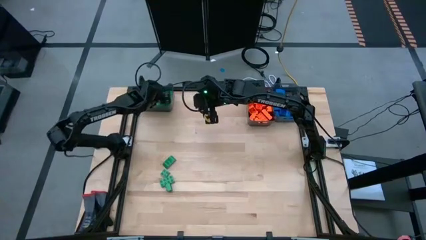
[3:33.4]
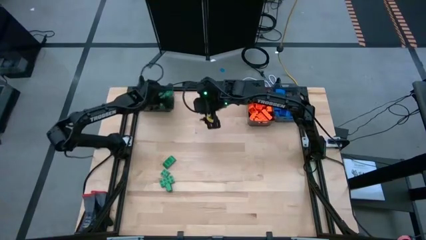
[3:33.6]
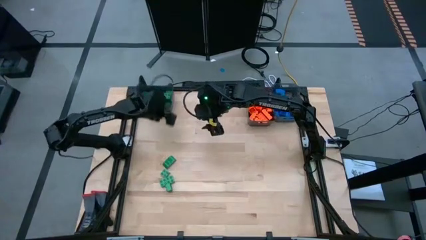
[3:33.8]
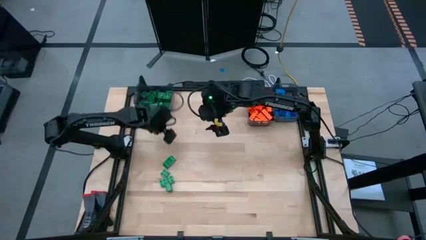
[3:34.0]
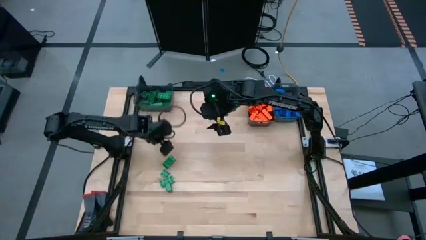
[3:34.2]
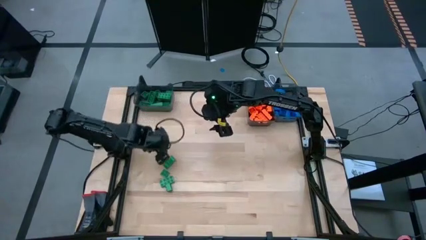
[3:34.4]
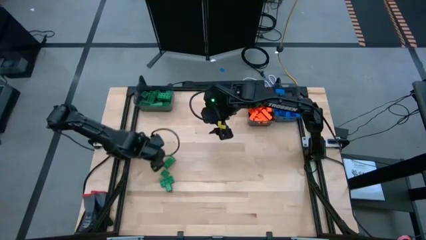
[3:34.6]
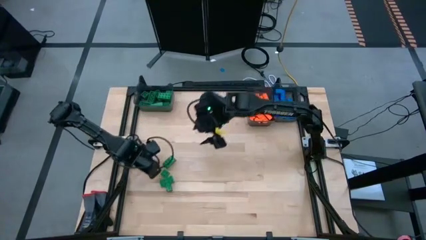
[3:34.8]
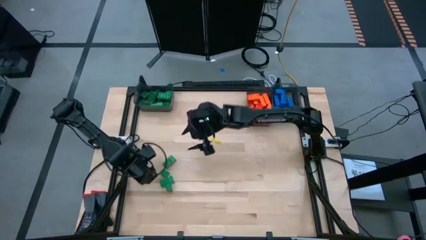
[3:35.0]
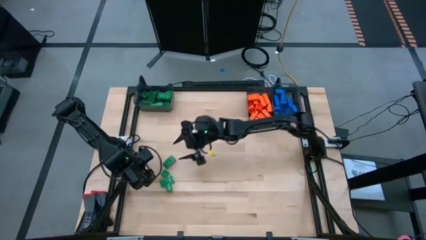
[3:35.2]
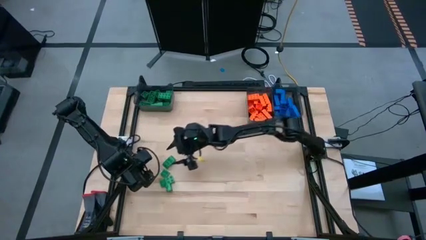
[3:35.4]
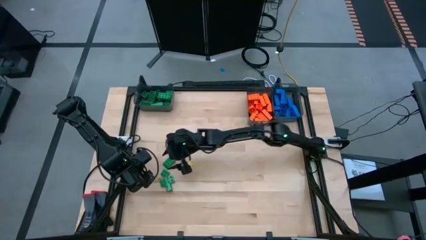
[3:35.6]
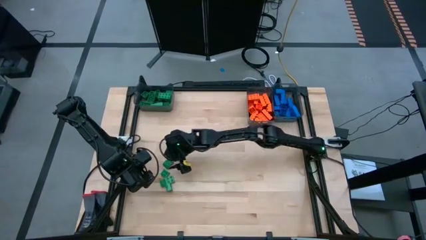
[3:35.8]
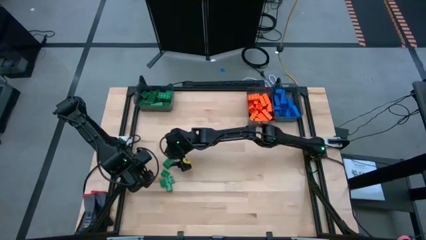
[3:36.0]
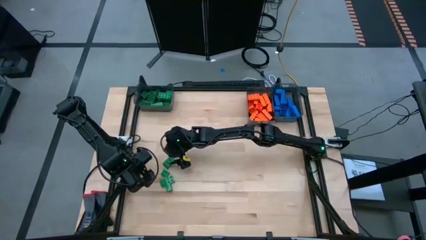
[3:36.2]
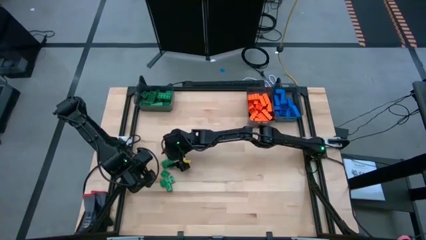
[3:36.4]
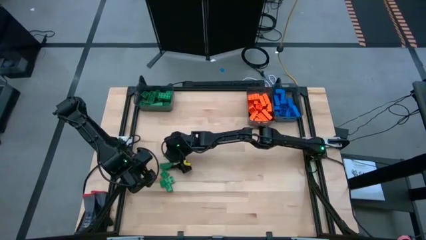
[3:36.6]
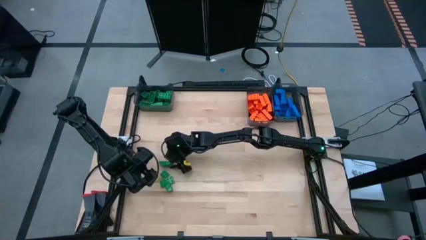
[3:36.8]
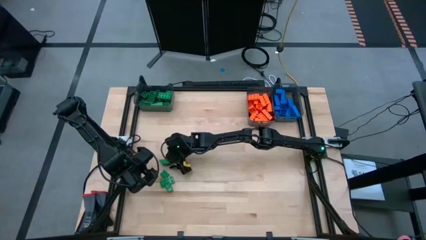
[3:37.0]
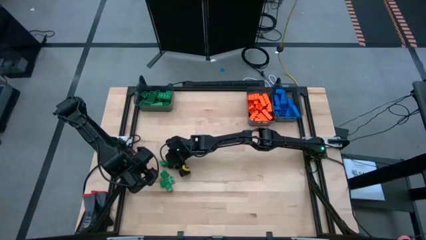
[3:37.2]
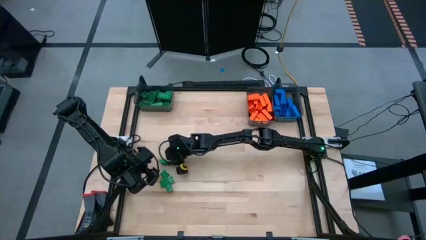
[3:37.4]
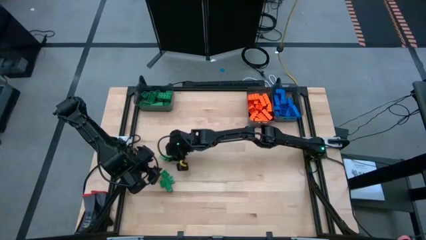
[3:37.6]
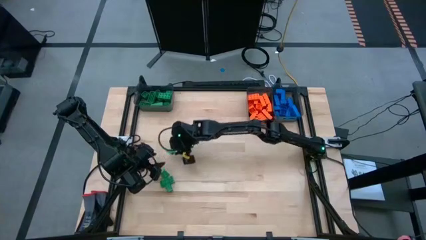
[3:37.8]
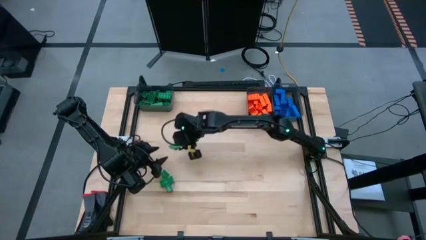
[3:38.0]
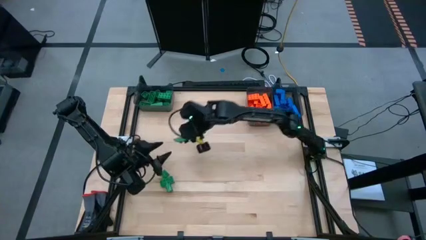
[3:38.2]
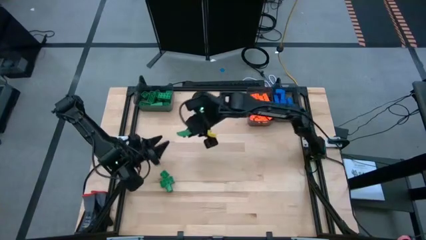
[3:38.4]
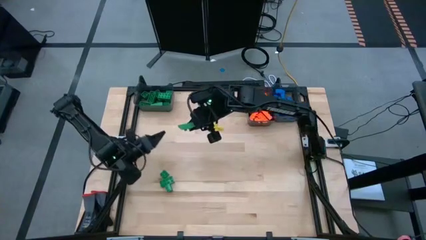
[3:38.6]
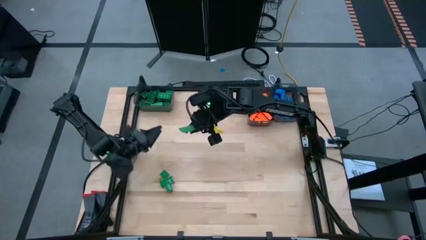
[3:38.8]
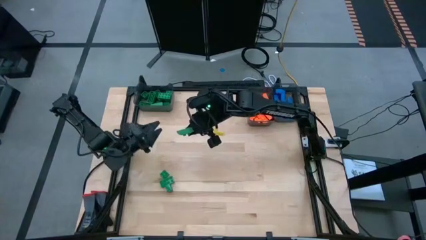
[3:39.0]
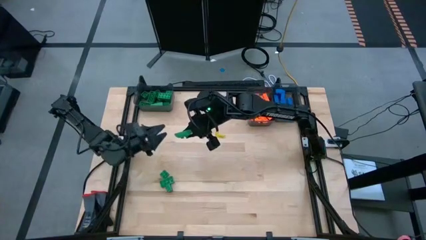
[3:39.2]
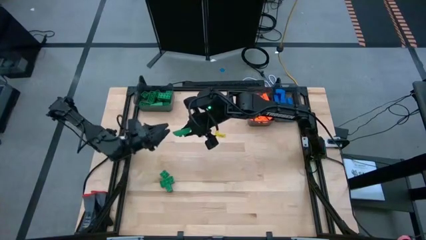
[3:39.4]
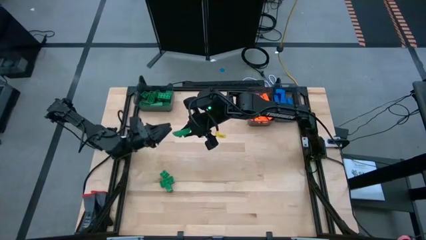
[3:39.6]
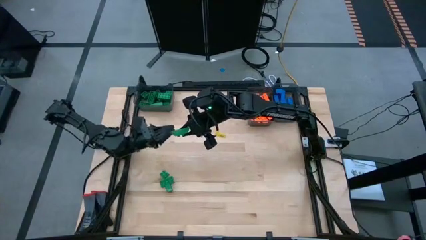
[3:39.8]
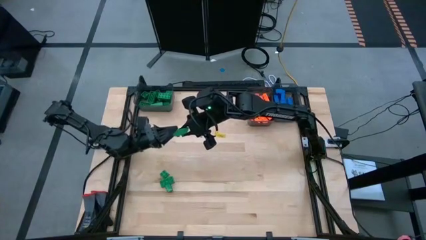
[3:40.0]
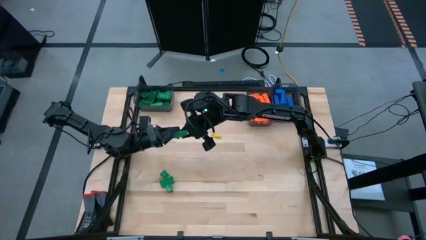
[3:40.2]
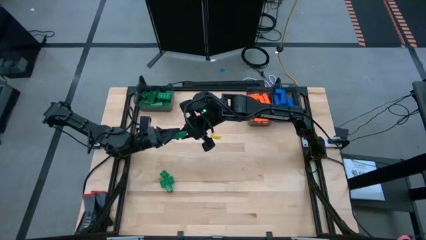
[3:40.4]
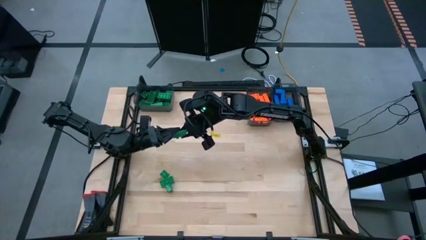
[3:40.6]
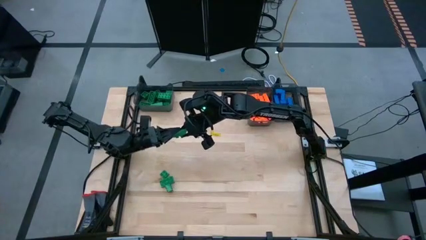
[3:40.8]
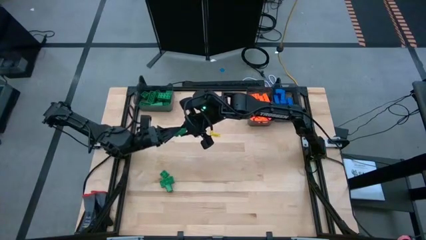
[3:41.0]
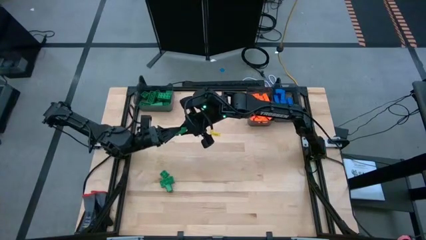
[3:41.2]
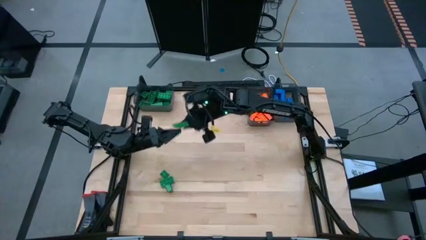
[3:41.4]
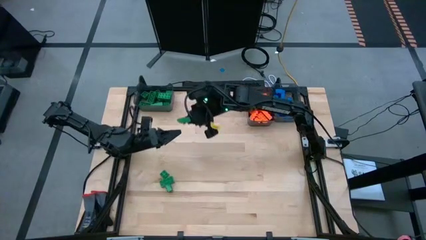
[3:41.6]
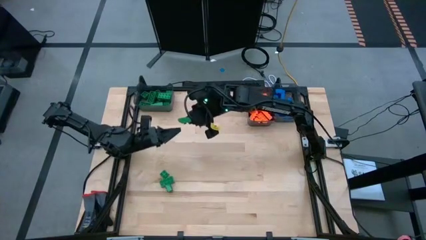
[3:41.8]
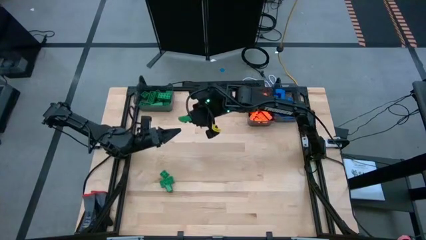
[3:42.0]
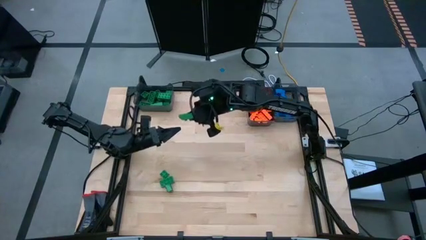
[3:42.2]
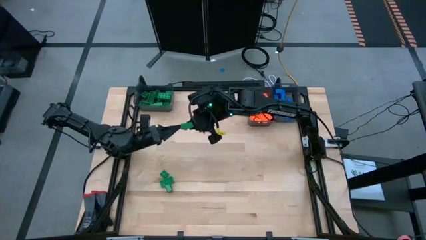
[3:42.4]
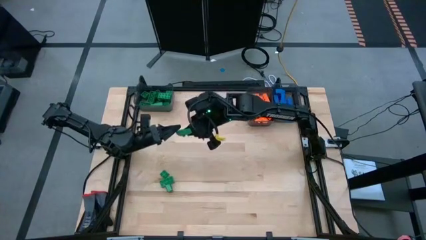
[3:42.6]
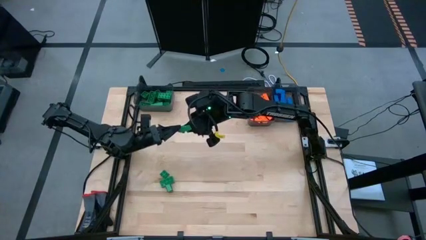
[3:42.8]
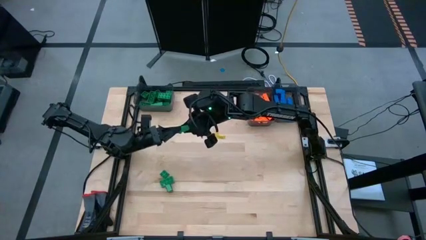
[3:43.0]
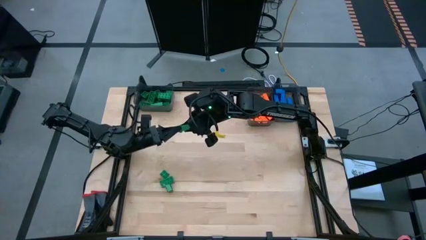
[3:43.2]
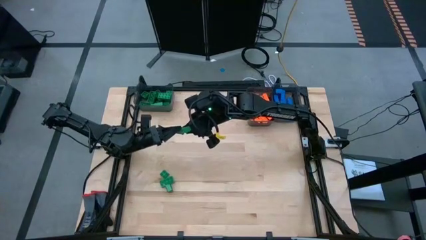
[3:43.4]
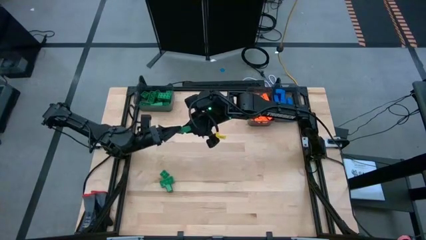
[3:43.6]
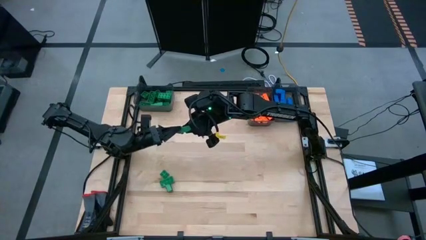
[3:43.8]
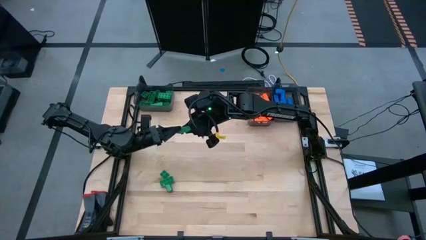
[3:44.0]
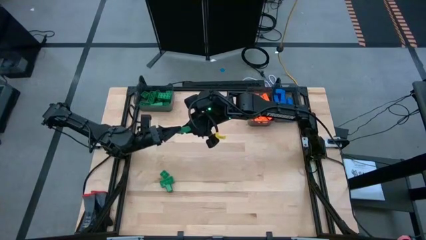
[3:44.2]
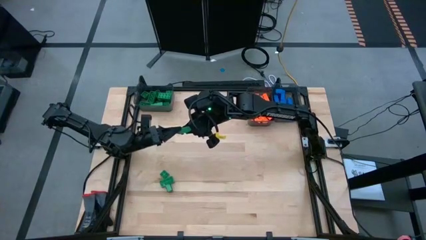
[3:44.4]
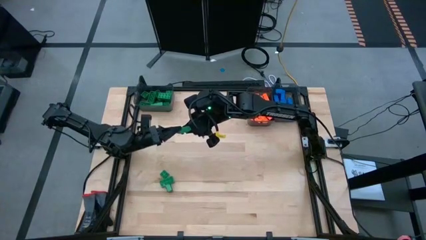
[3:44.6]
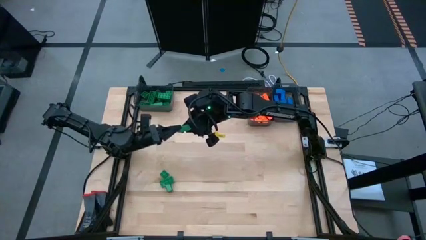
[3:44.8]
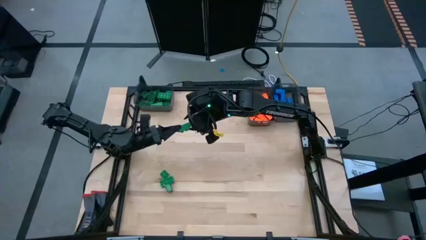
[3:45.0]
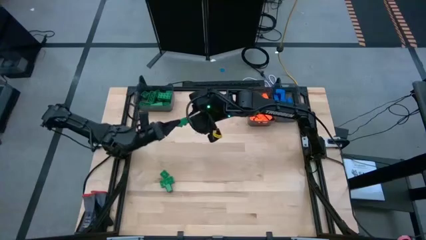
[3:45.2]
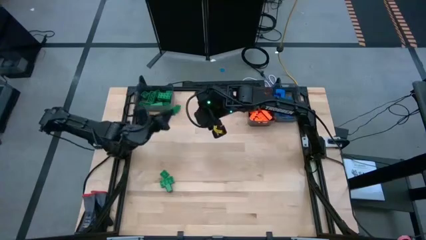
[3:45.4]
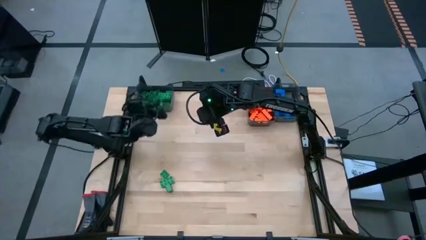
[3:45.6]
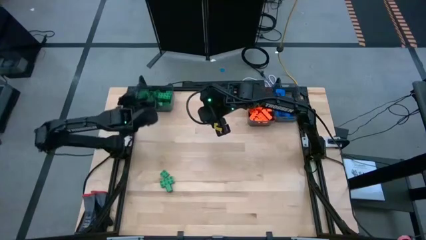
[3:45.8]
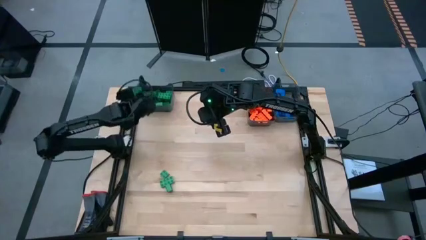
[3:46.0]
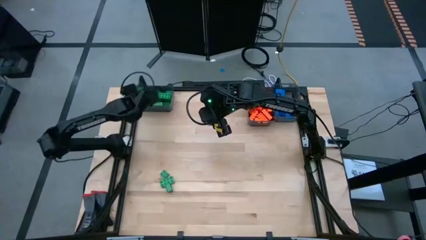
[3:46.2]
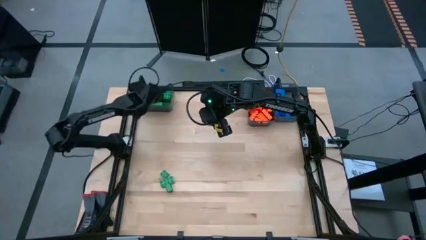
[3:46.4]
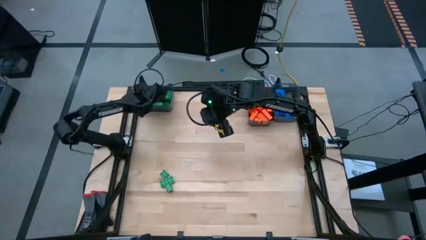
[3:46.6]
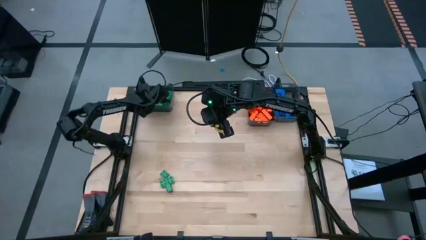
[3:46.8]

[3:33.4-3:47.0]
Task: Sort blocks
Put the green game piece into the left black bin
